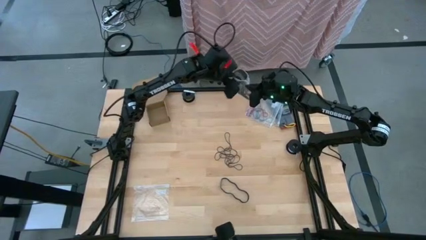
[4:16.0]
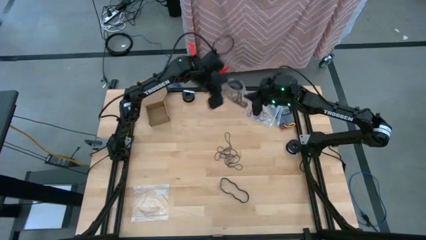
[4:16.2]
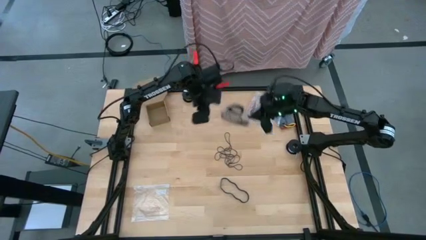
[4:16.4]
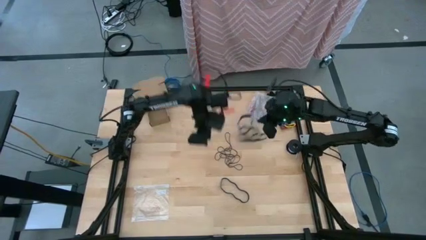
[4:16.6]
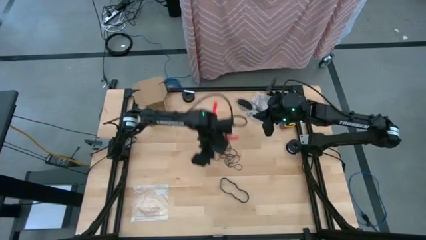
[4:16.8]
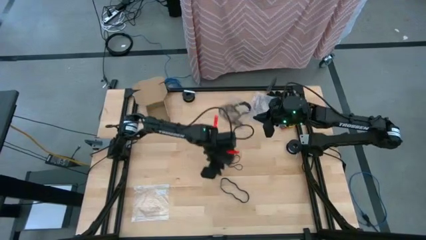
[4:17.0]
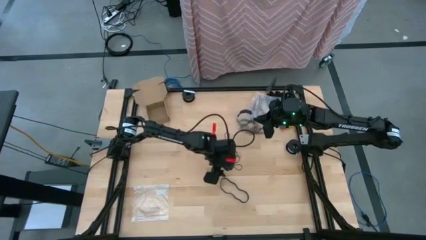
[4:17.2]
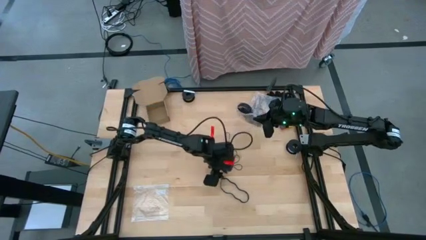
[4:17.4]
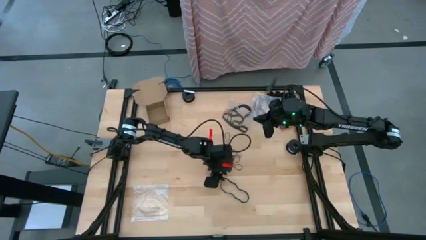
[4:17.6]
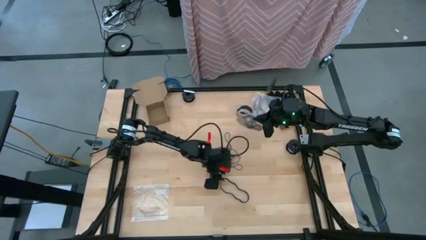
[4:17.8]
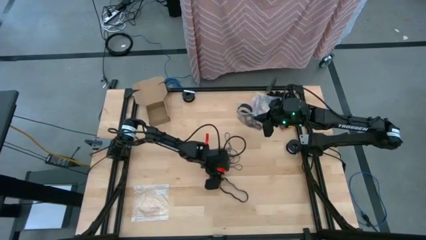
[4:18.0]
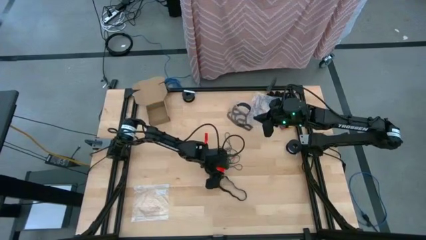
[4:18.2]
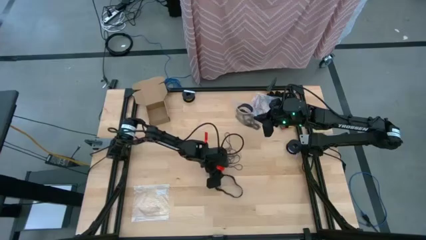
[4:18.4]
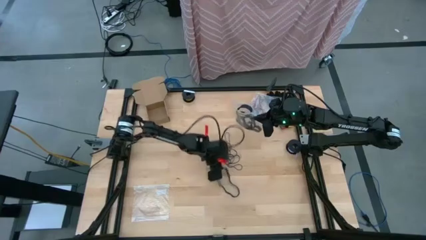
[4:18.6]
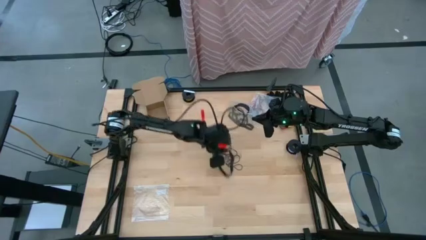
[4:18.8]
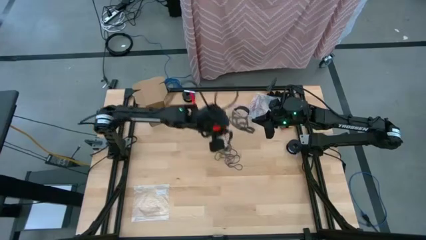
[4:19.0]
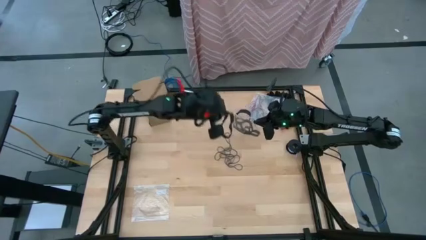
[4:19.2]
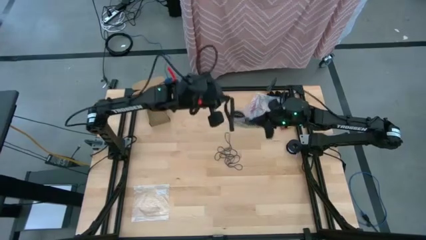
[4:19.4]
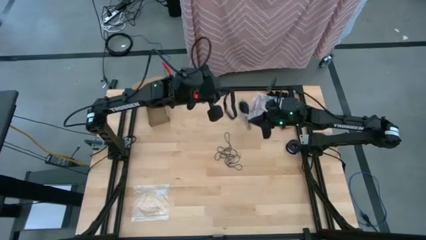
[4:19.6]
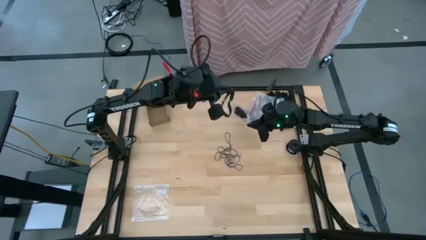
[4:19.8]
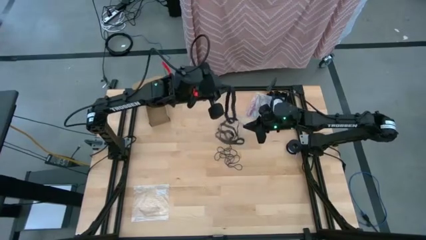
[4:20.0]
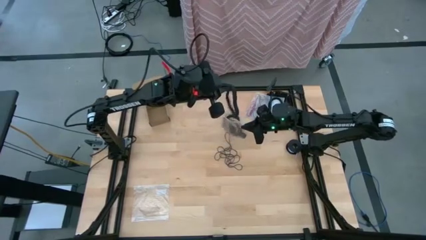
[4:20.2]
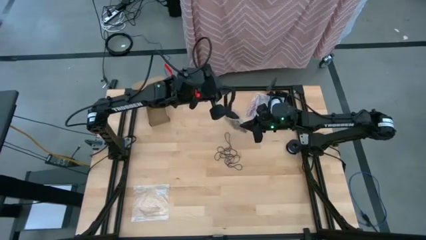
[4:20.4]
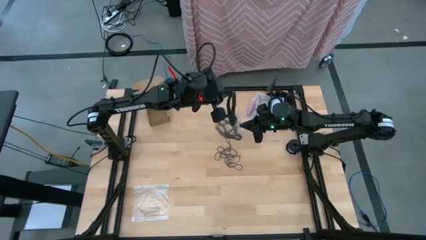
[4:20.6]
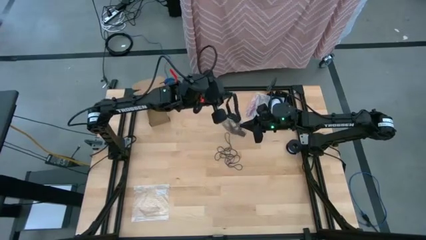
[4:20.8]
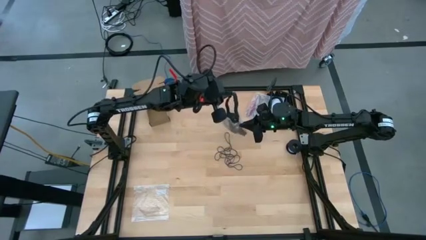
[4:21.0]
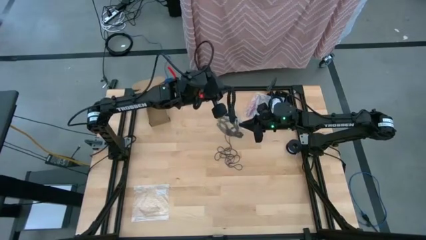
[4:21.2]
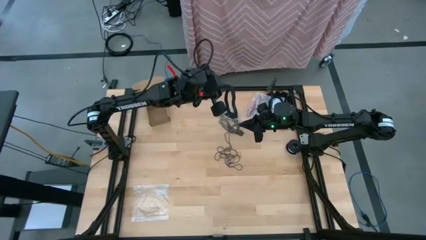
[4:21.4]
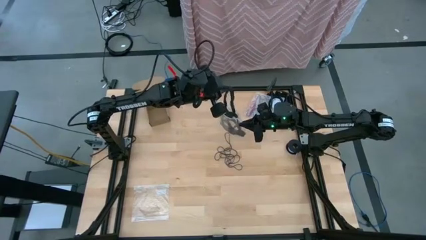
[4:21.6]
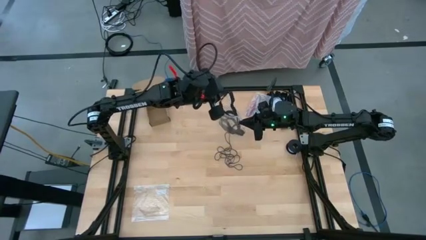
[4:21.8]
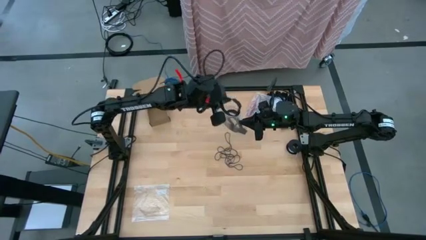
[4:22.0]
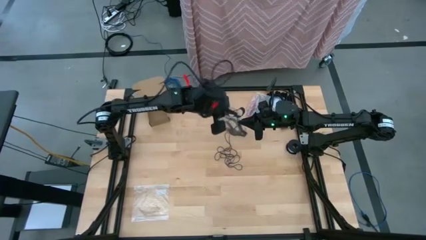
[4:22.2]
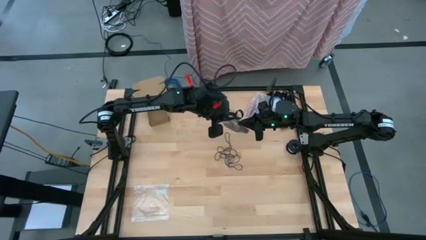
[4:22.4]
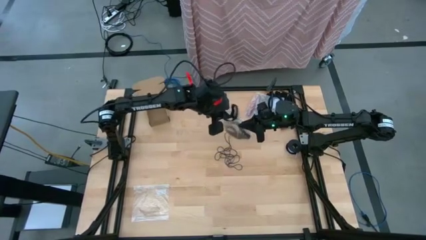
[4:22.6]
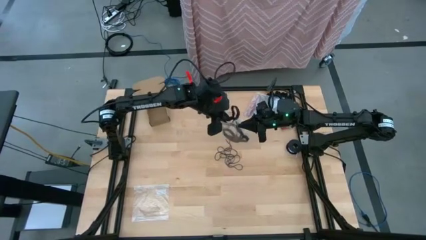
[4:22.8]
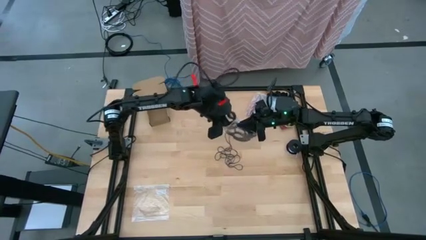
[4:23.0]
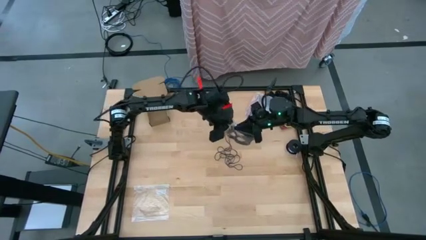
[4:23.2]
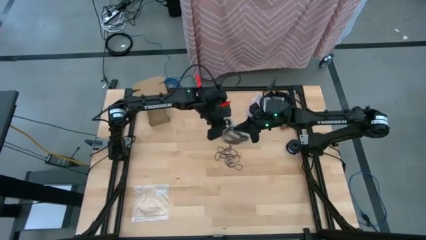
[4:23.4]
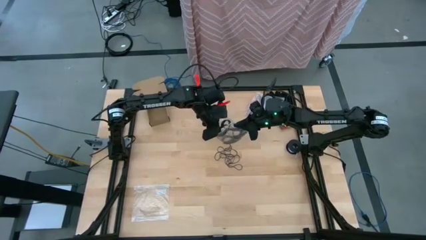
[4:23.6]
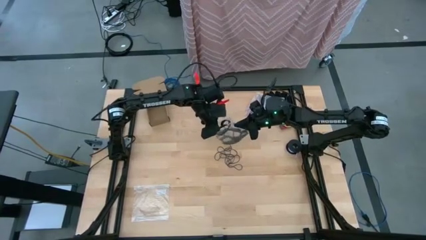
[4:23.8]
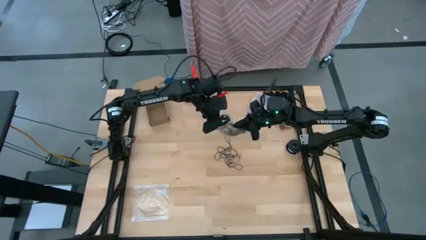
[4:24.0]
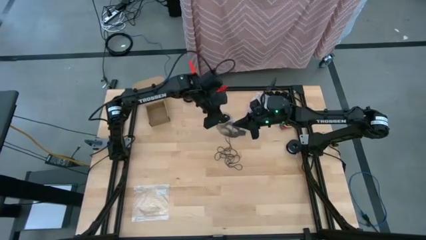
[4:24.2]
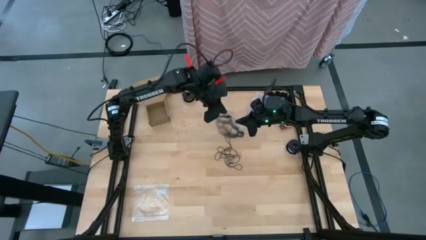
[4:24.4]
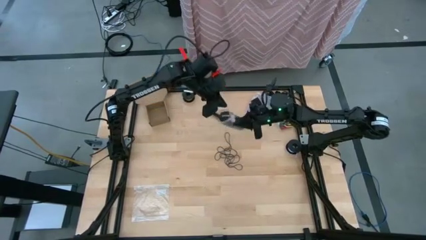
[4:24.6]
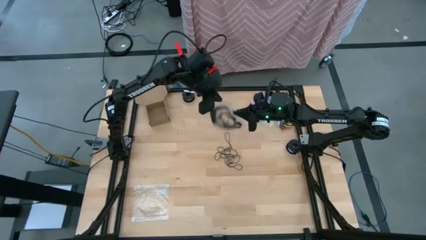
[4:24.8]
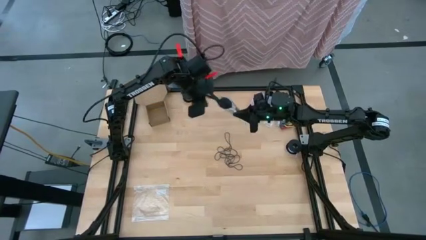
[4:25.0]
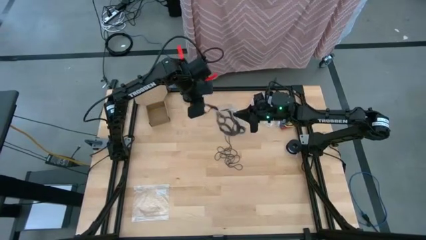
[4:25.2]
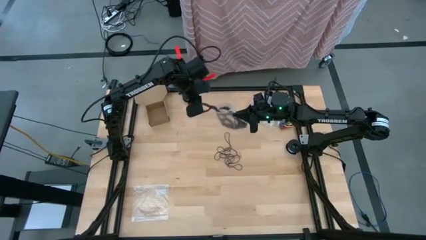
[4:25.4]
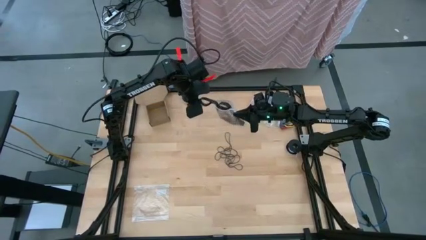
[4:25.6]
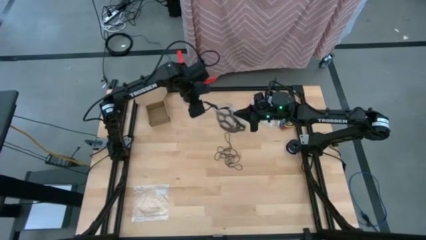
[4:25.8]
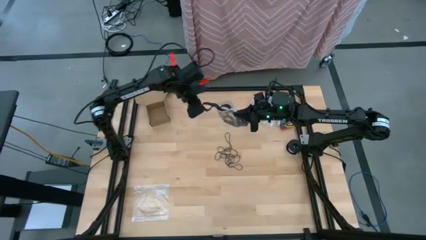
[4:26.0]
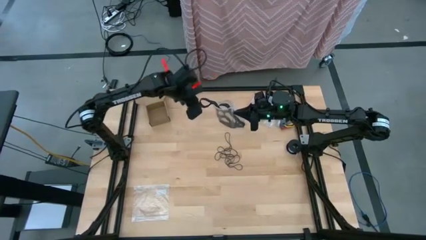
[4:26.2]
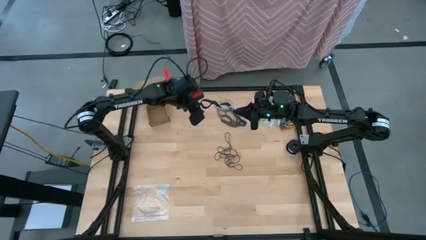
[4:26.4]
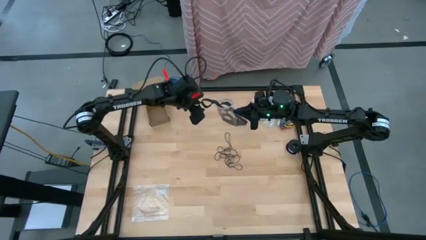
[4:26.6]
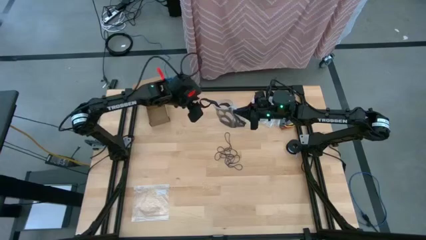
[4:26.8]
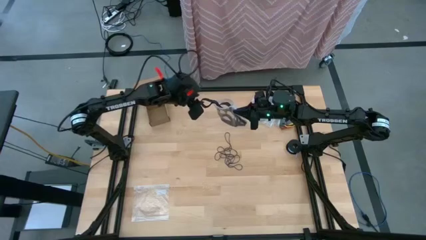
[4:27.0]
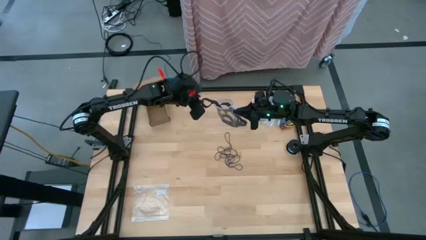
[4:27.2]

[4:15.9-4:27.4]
Task: Sort rubber bands
Put the black rubber band into the transparent zip bag

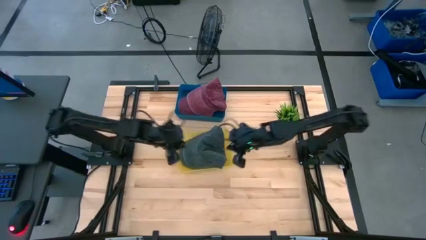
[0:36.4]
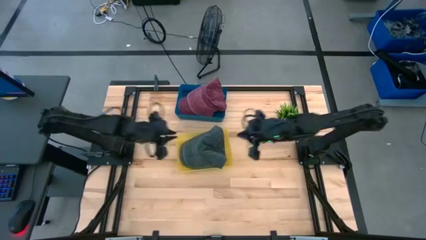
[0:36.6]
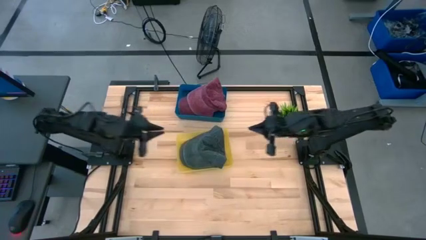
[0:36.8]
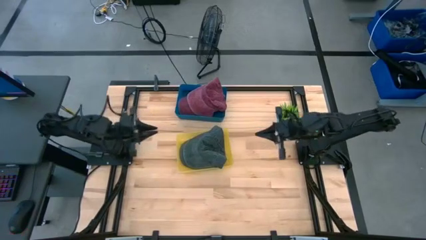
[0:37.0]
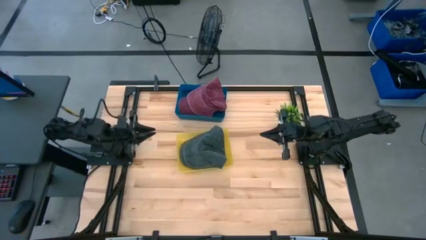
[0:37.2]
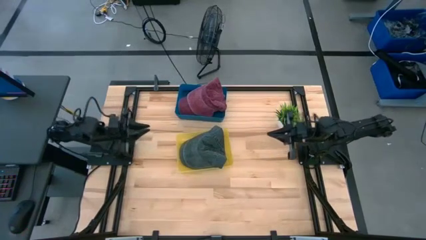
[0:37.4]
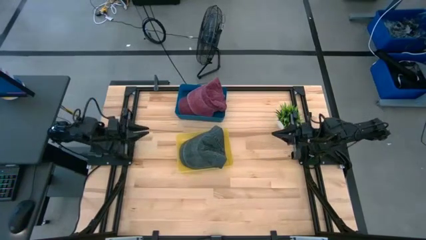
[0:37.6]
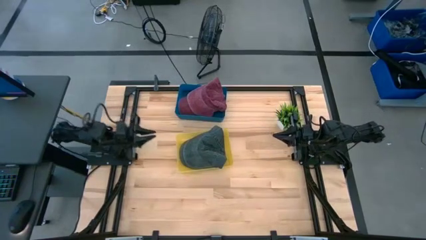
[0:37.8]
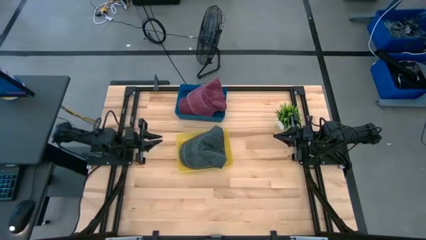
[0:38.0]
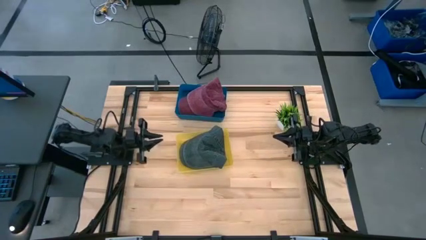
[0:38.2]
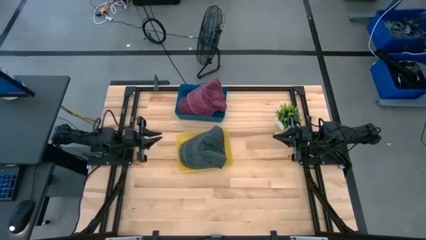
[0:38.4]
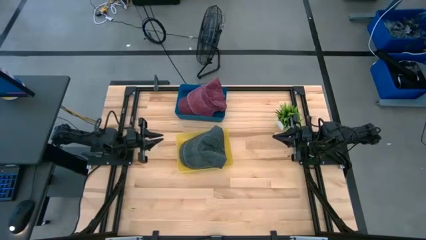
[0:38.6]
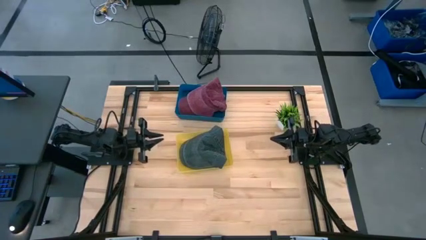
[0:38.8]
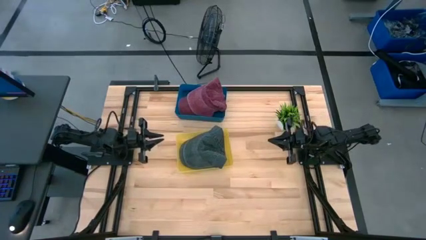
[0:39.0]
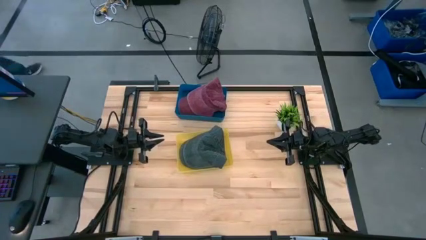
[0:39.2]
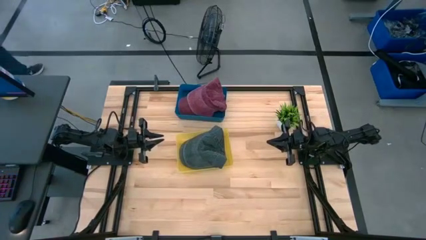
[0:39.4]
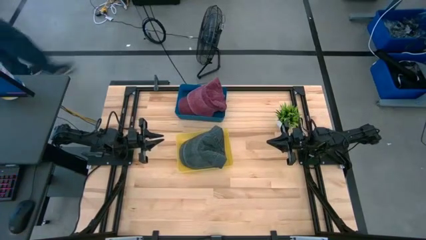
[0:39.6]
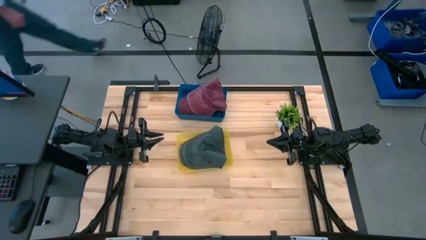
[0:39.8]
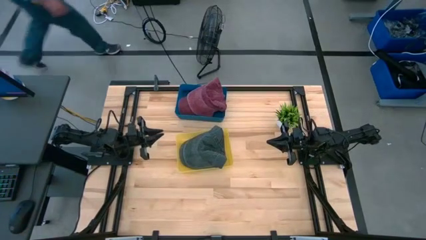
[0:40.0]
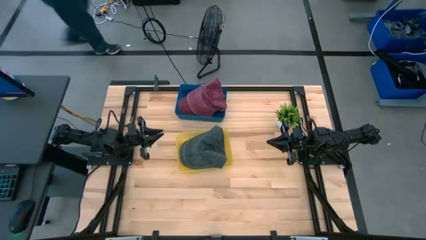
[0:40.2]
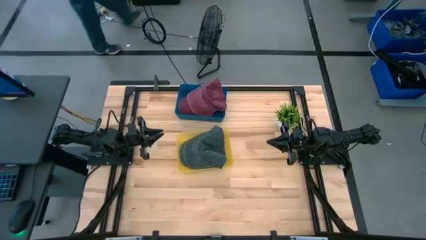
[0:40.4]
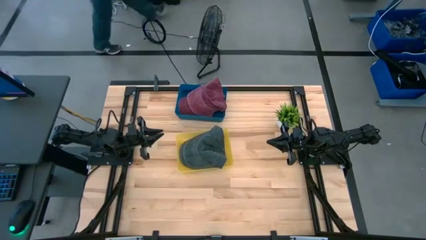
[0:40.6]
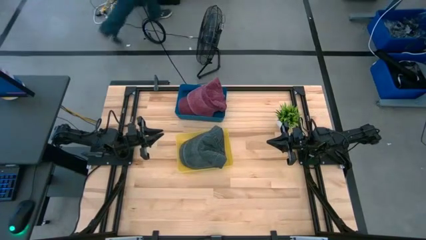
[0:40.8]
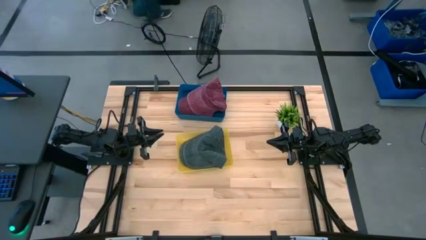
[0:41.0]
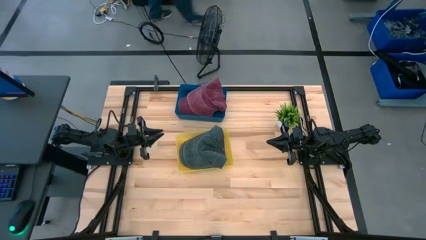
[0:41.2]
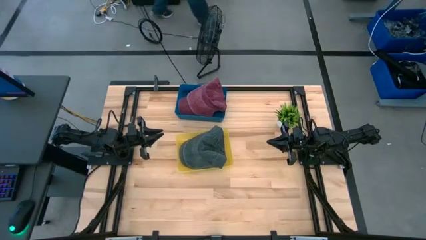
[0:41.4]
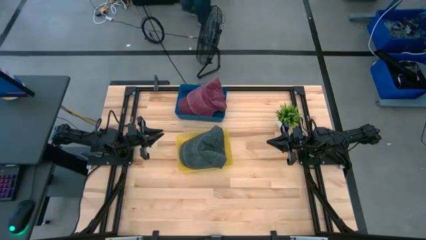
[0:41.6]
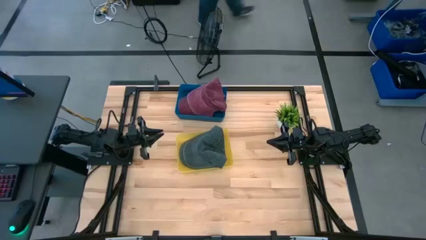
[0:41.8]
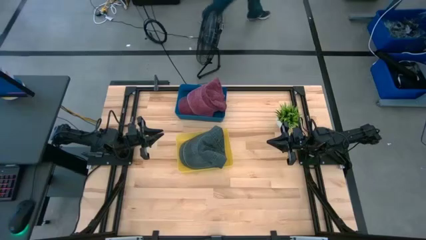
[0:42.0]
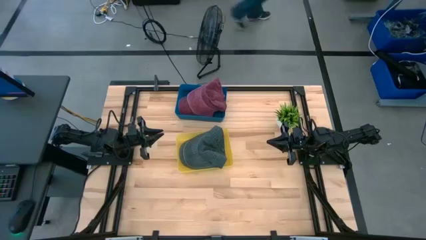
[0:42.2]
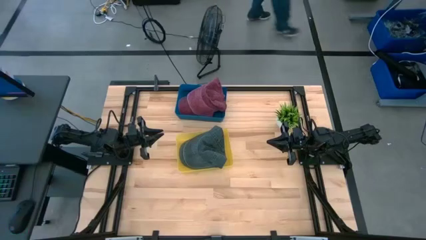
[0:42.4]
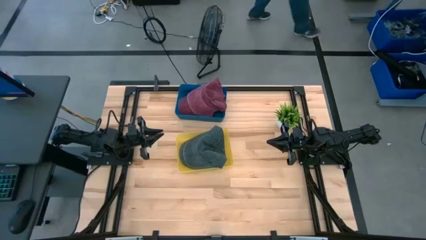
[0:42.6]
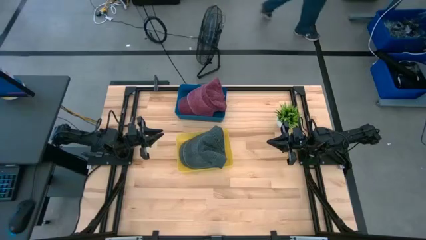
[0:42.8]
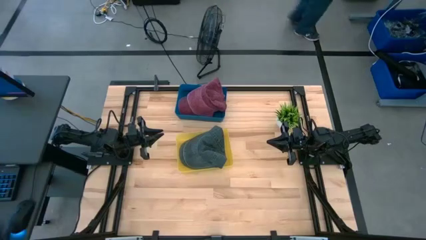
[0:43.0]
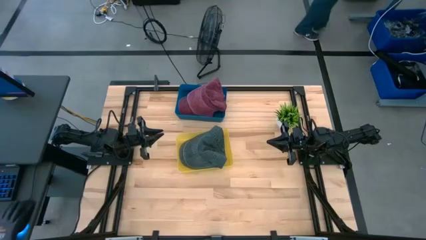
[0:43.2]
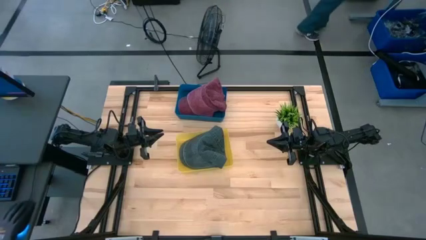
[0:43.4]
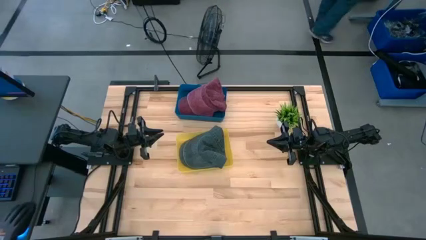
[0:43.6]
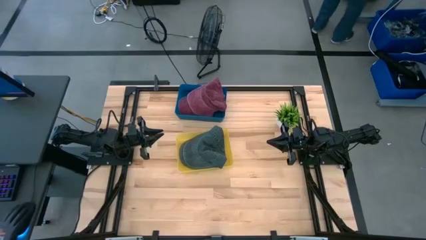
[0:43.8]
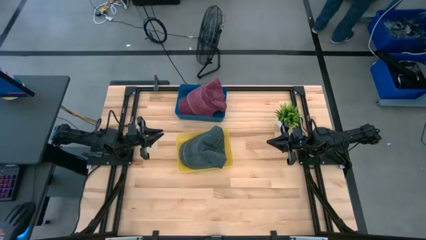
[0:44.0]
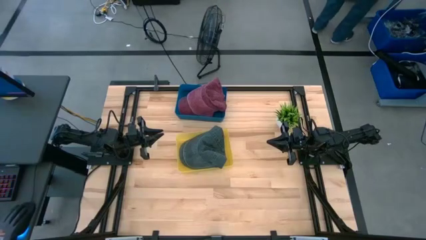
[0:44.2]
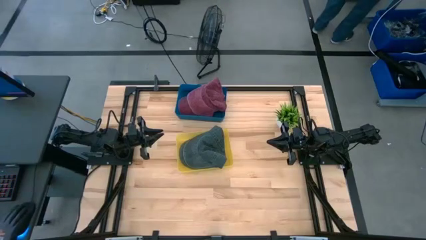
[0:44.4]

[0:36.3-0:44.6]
Task: Pick & Place hat
Return to home position
